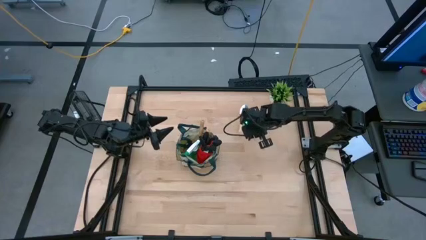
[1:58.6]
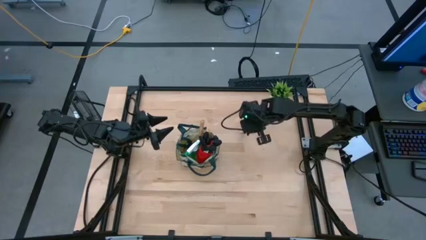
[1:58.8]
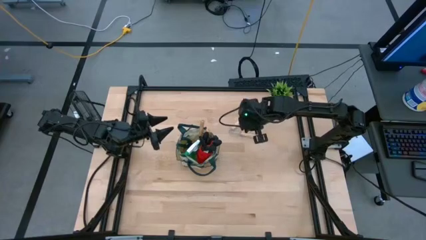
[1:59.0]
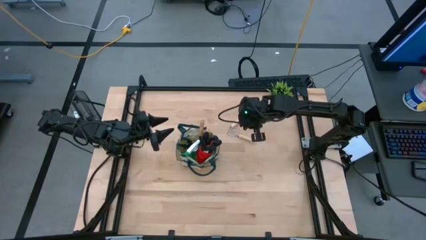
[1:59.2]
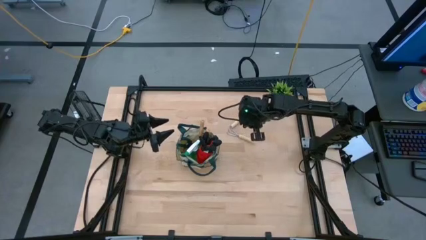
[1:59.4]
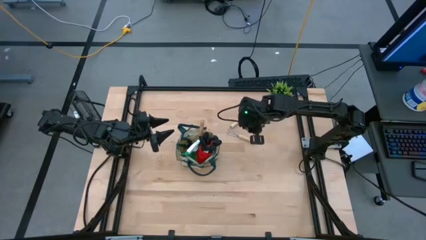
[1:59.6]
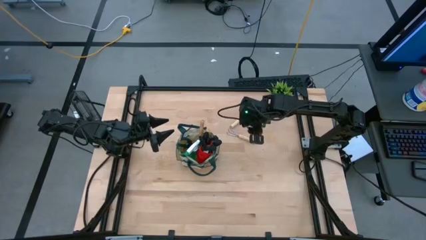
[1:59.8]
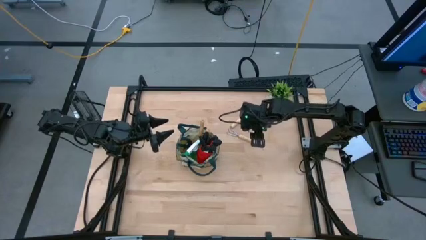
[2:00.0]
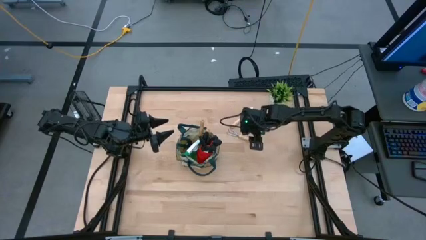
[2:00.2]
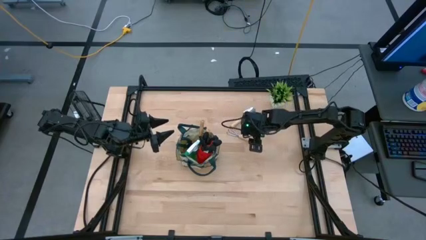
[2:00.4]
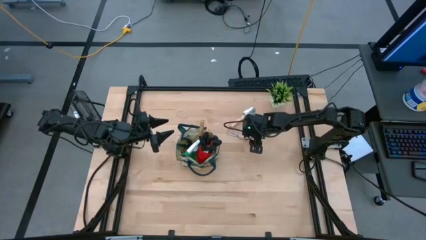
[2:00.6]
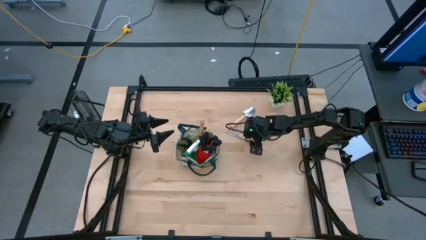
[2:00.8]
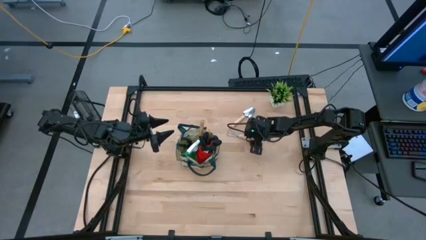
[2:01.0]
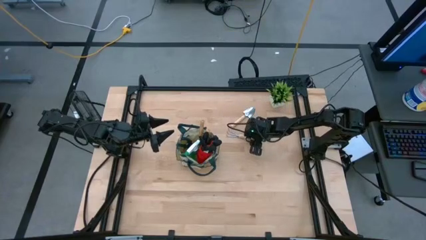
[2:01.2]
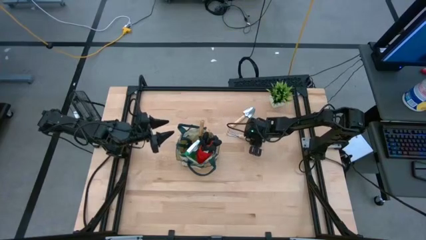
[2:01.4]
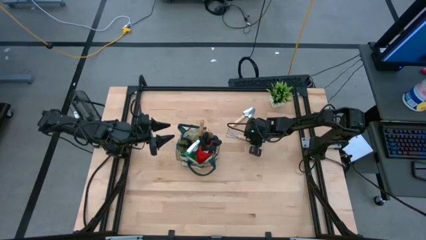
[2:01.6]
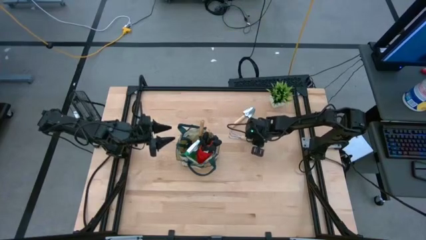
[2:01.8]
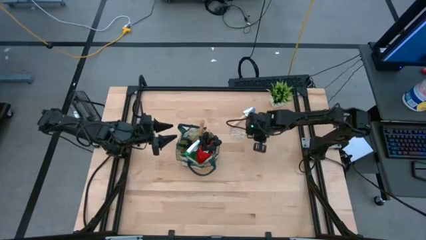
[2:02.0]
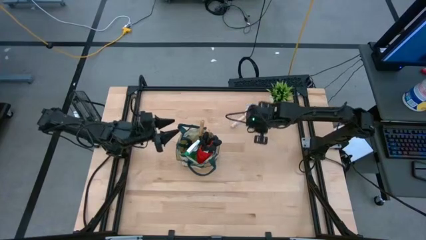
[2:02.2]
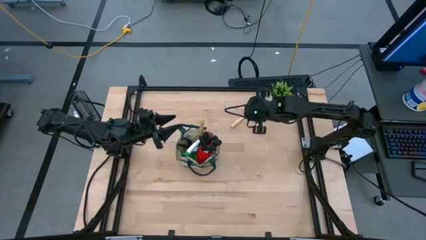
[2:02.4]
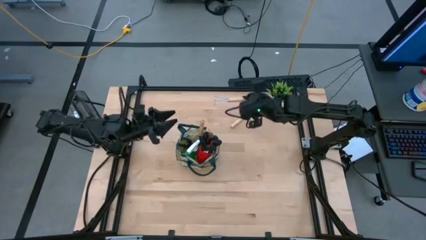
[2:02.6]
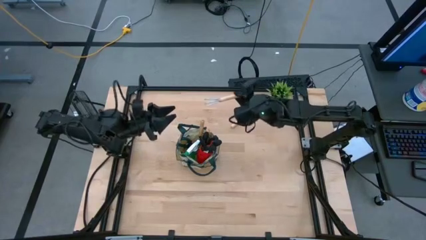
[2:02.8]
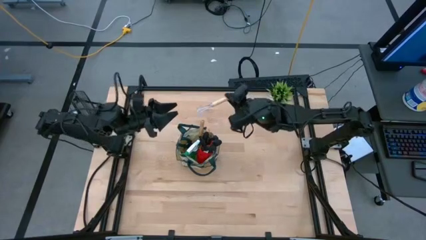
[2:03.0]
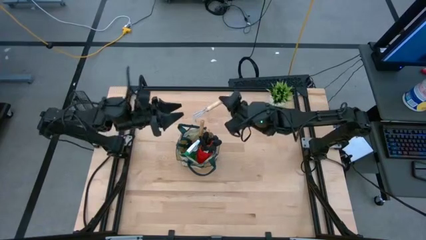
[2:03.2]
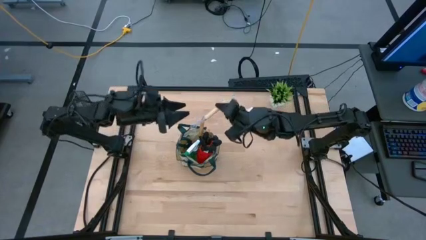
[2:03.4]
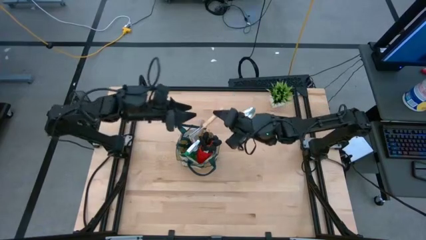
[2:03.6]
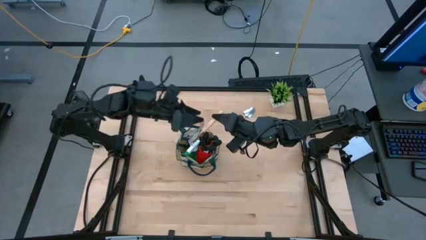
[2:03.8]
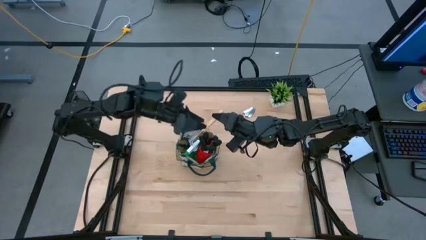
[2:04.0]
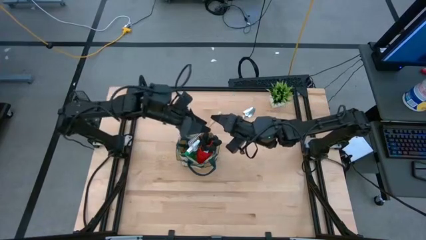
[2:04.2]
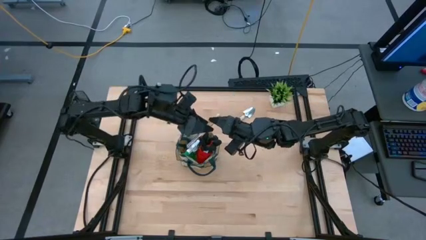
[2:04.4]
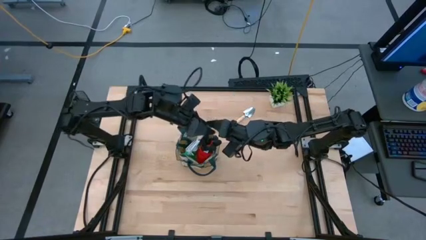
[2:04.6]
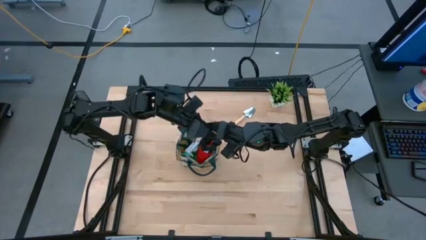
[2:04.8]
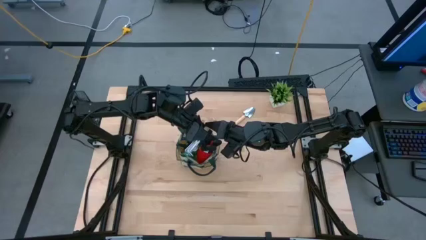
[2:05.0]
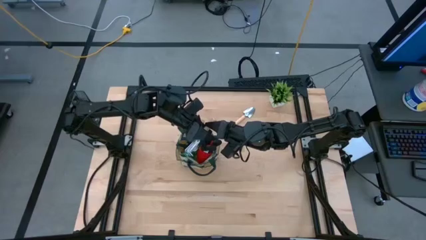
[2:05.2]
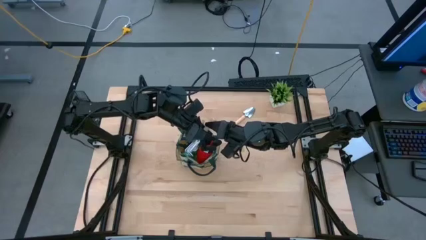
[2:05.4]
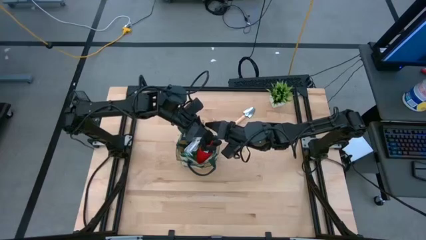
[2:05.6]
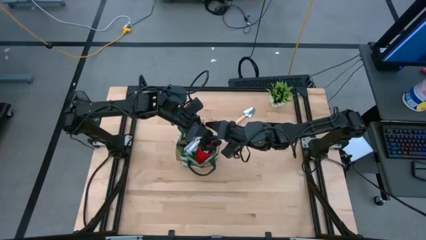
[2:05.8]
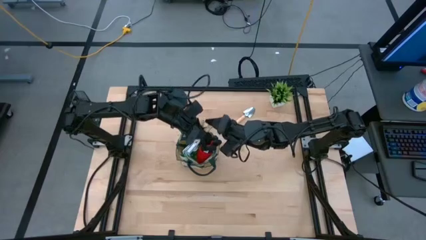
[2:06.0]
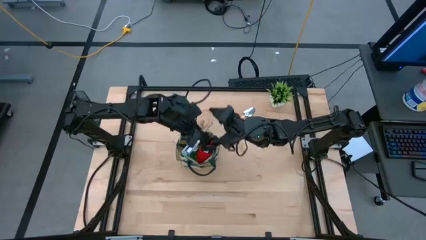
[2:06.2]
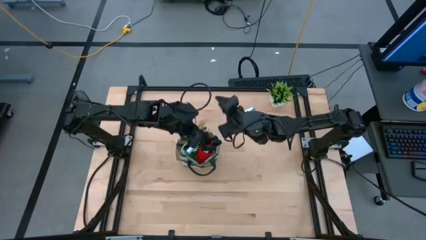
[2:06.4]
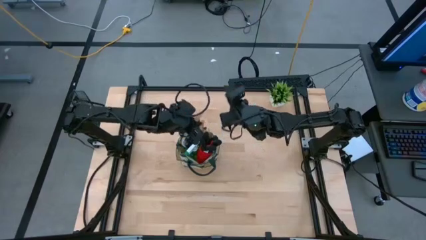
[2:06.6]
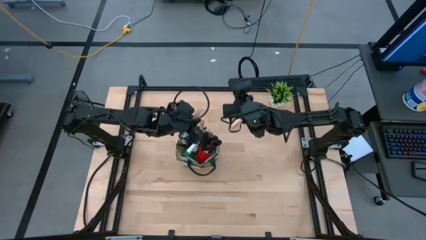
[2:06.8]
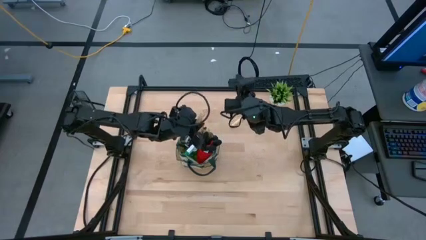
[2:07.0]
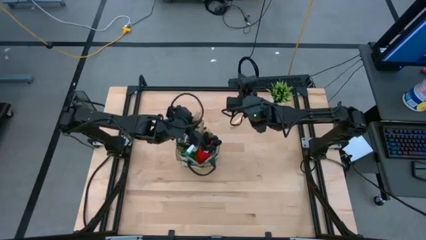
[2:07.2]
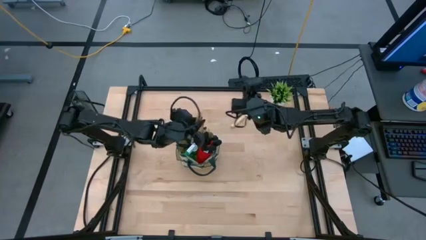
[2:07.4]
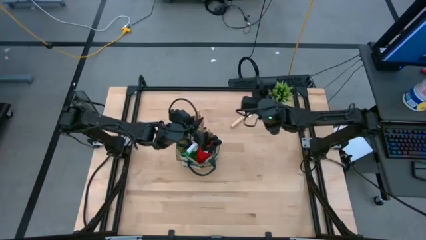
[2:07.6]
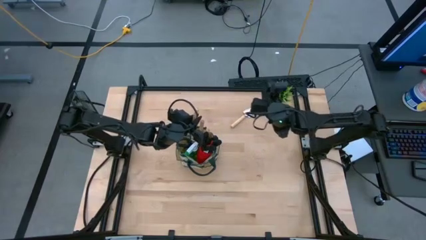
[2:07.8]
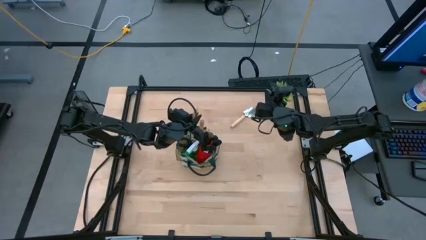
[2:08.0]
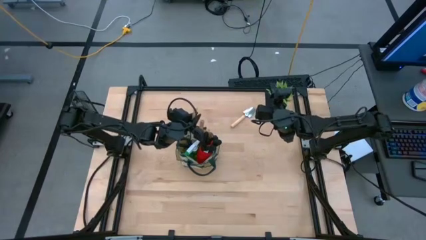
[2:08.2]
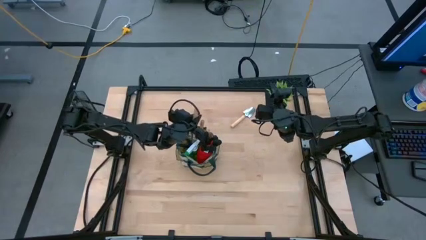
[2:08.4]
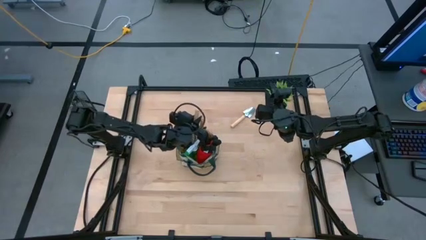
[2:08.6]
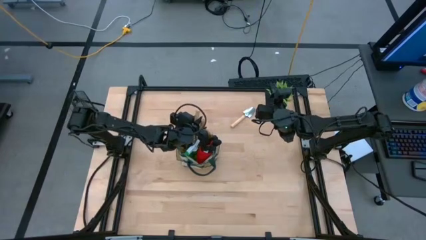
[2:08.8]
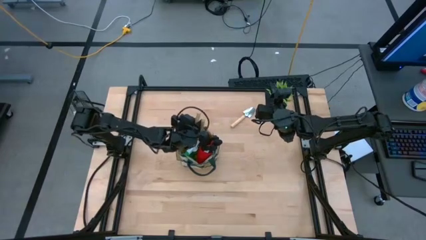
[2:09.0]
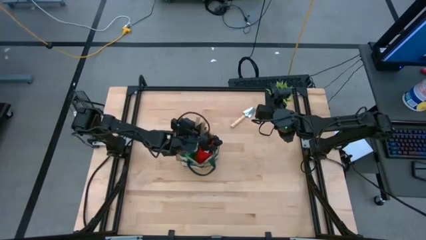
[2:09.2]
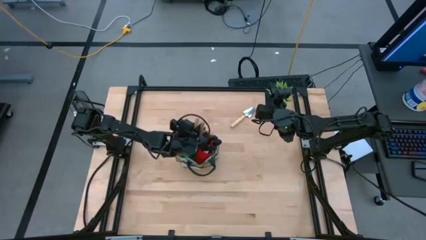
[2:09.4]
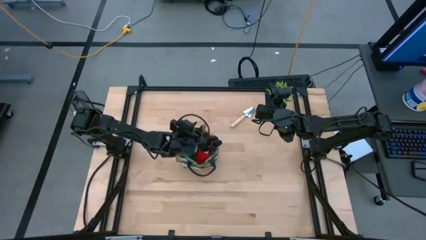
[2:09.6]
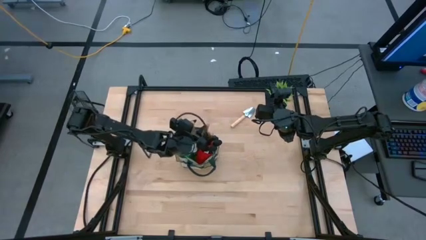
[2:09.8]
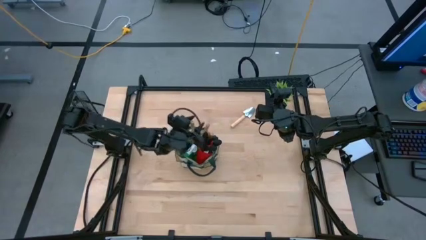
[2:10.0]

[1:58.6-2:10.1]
Task: Pick & Place Garden tools in Gardening bag
Put the brown hand rake into the brown gardening bag
